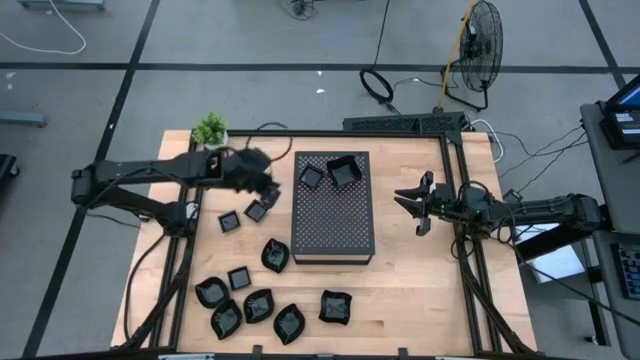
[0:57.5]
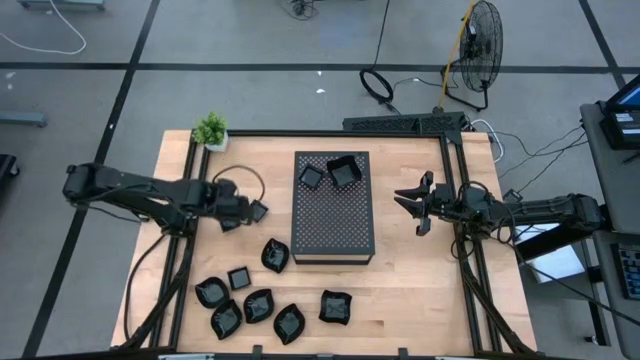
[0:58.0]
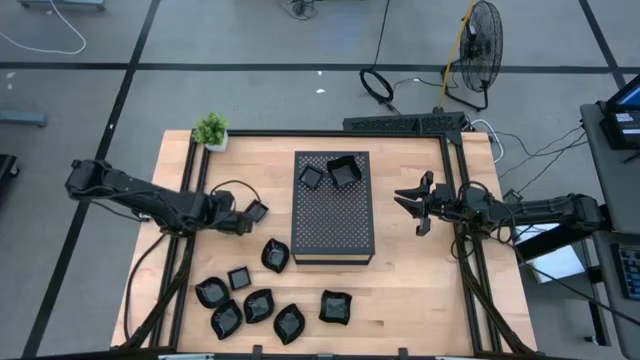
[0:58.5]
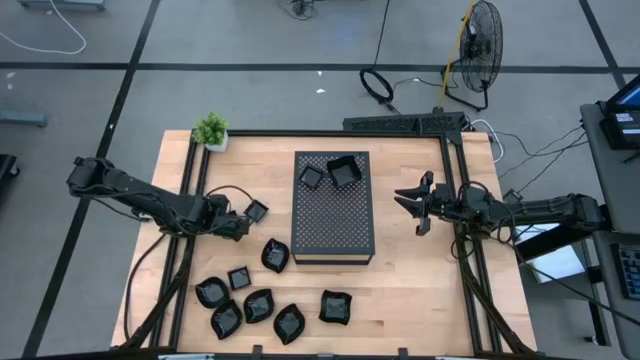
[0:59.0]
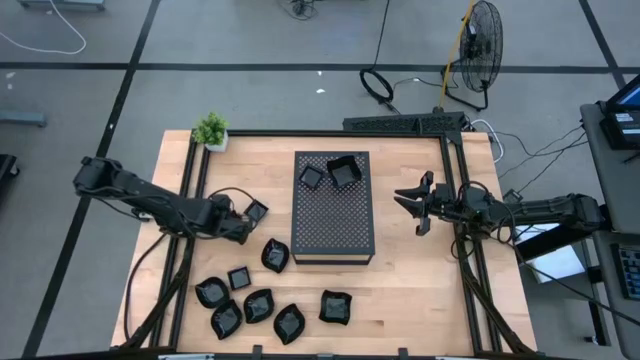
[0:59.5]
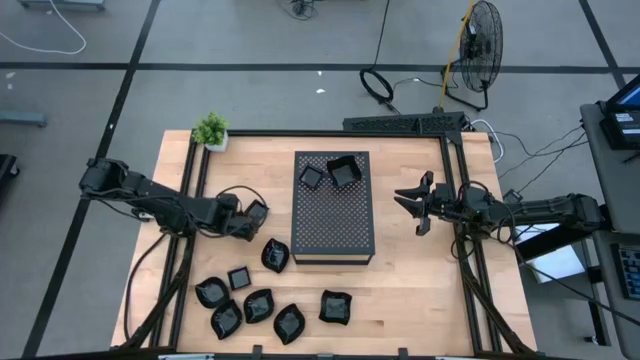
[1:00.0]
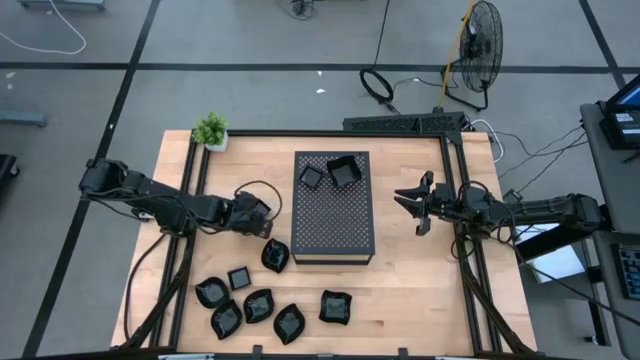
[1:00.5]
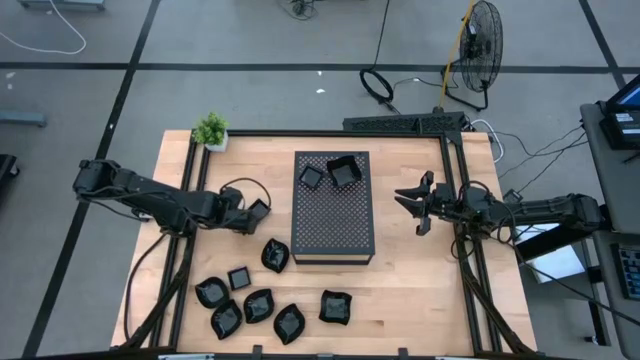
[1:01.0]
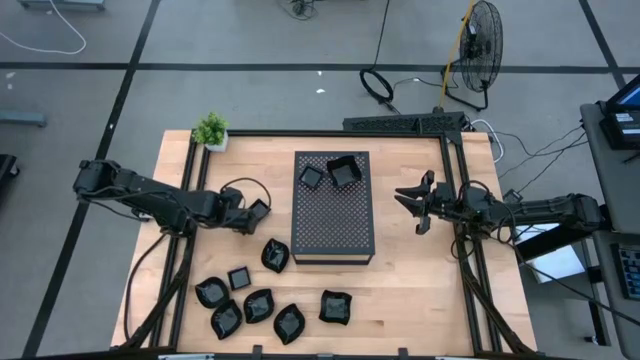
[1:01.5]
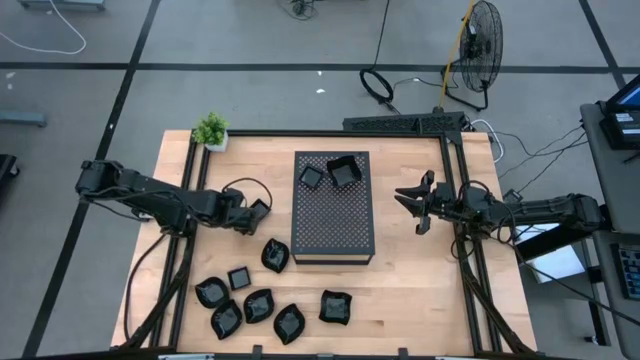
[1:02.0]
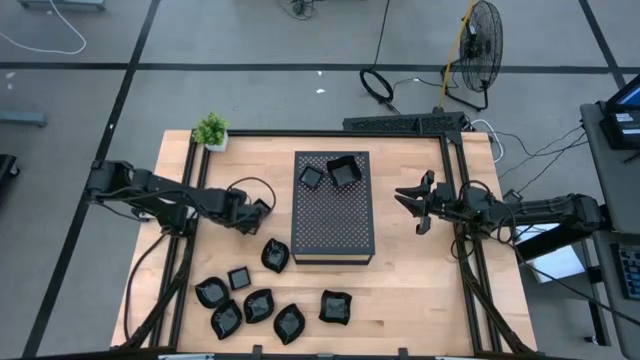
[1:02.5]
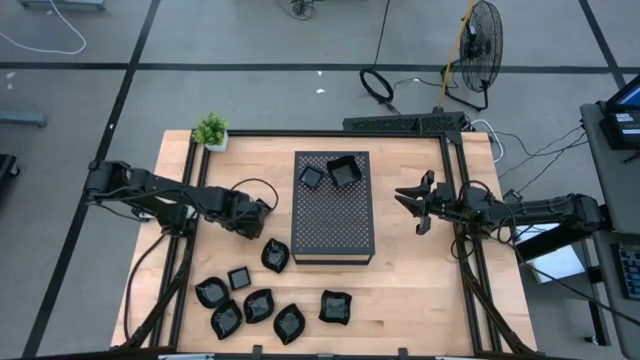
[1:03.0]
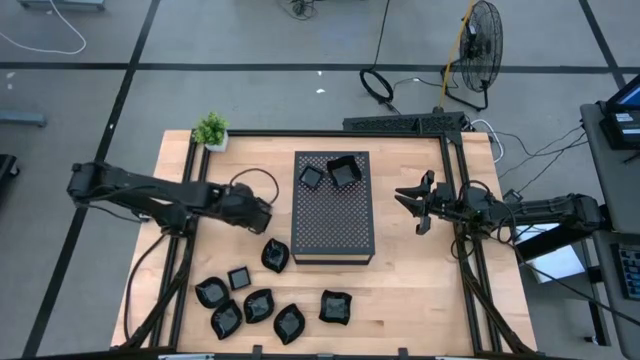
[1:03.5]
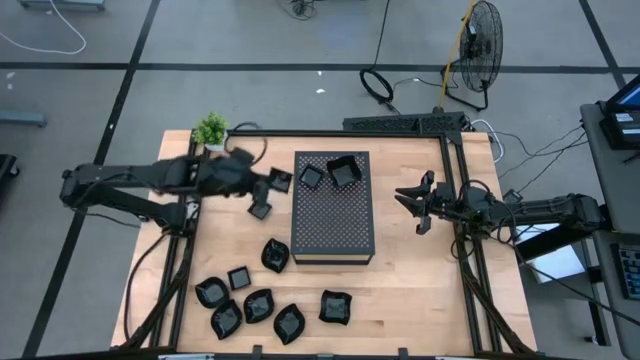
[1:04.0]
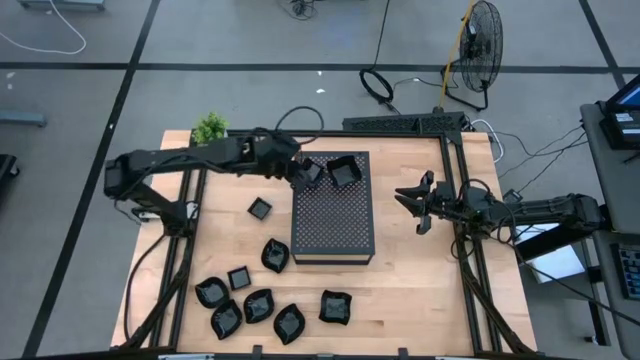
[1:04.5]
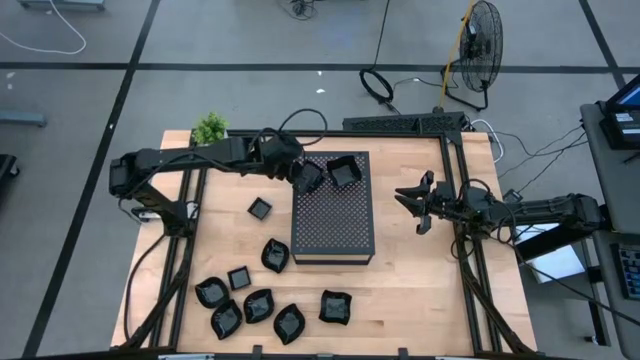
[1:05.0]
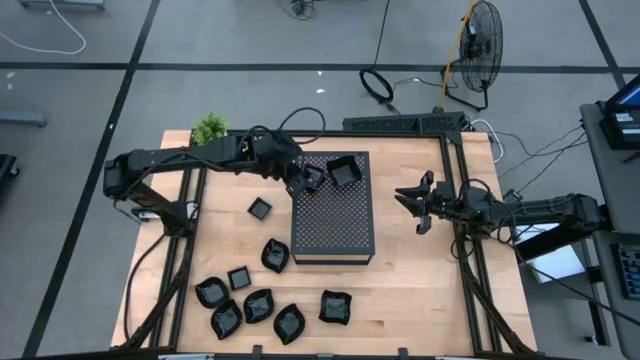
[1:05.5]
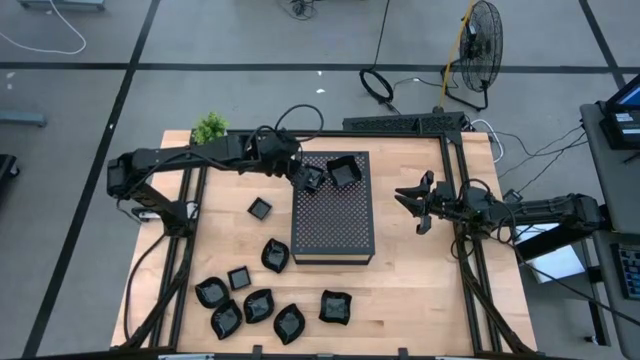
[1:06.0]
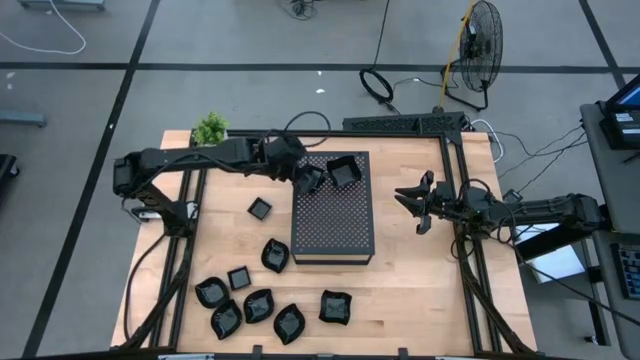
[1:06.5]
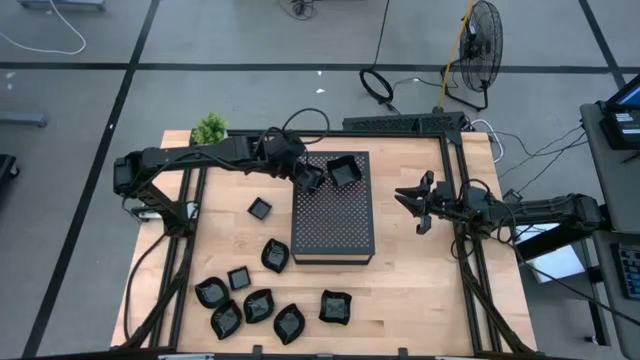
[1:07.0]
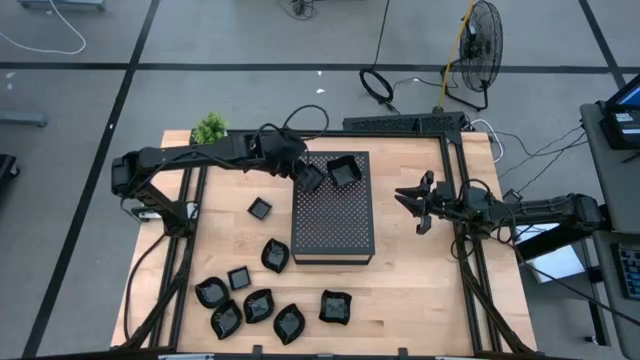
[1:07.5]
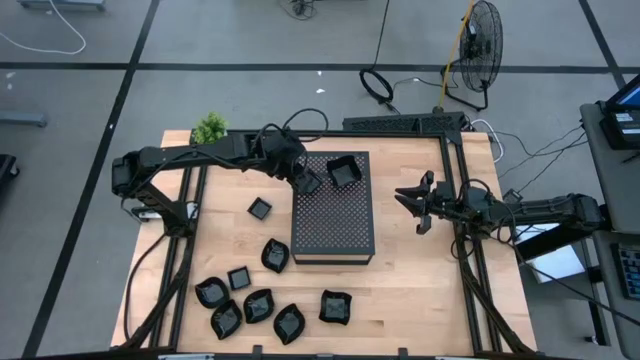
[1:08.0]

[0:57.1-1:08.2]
Task: Pick & Place Mini shaped plates
Stack the black square plate on top of the black square plates on the shelf

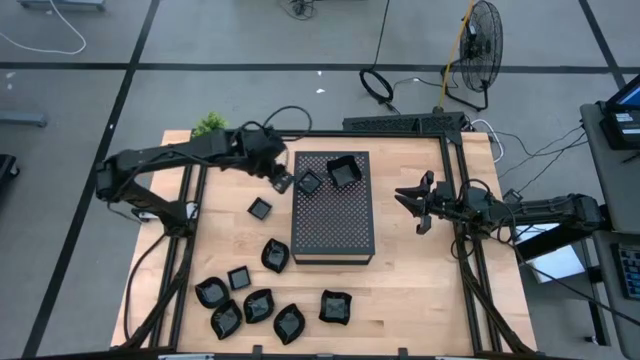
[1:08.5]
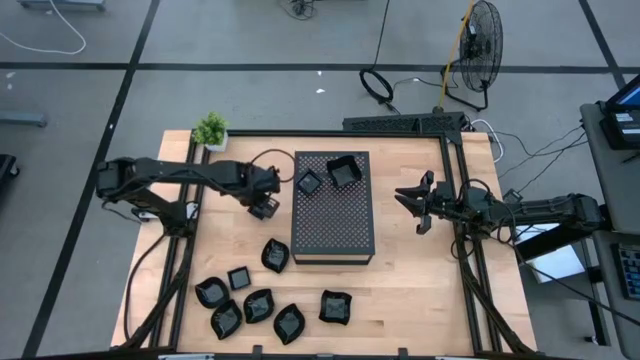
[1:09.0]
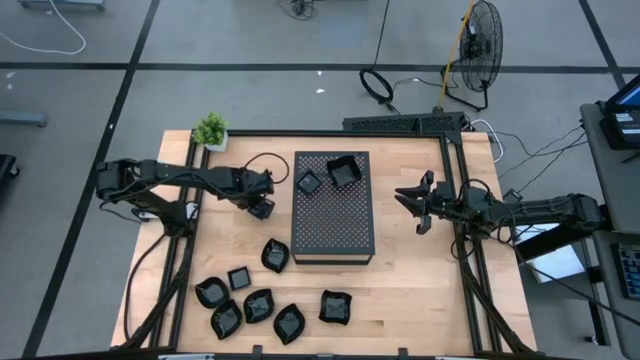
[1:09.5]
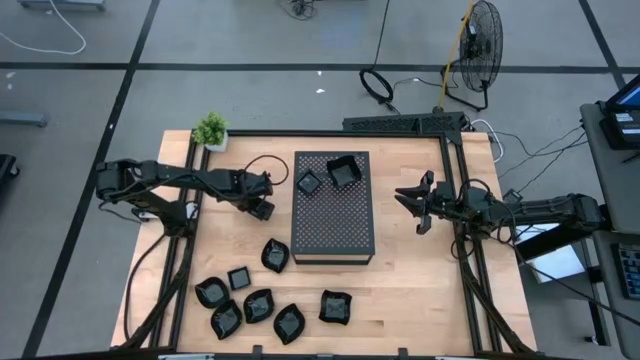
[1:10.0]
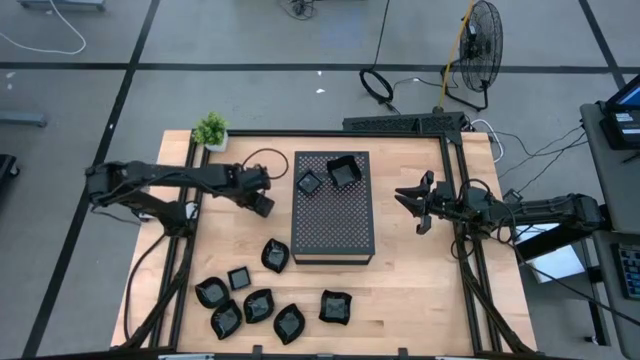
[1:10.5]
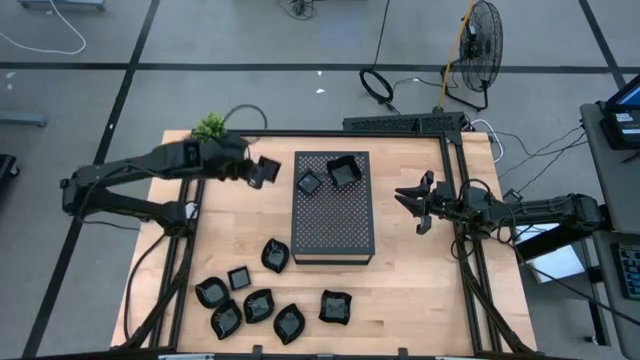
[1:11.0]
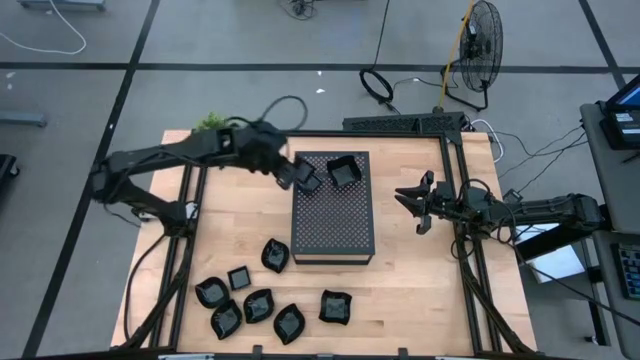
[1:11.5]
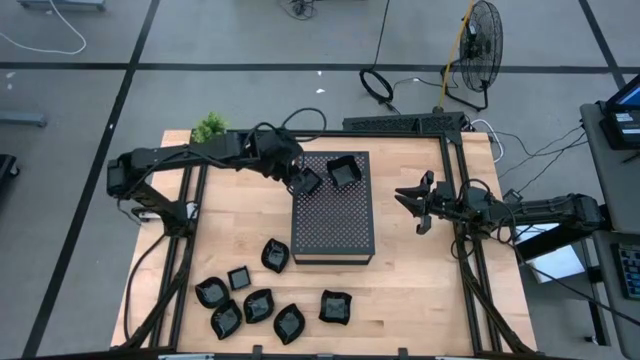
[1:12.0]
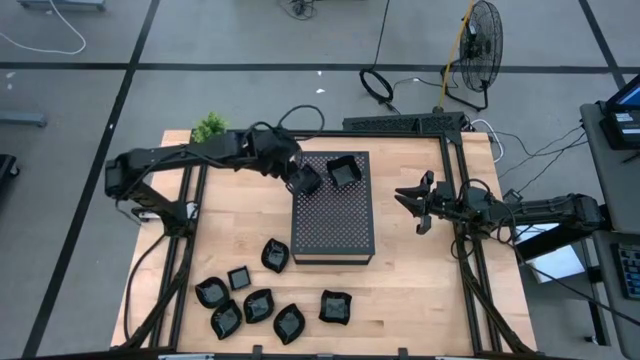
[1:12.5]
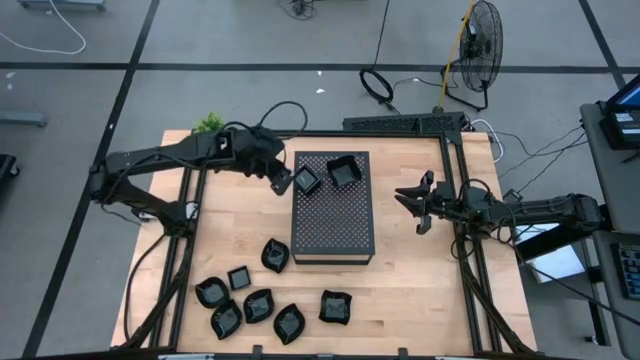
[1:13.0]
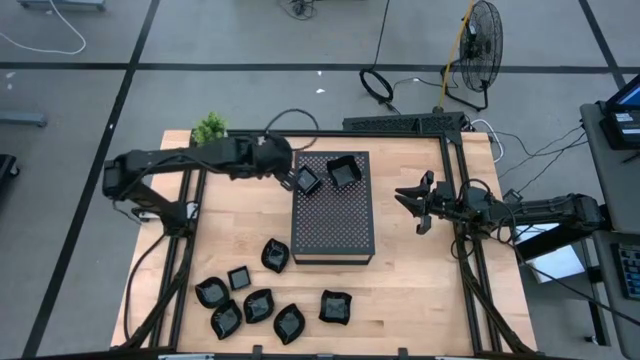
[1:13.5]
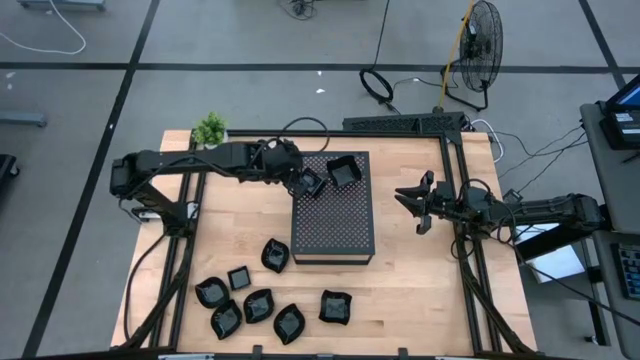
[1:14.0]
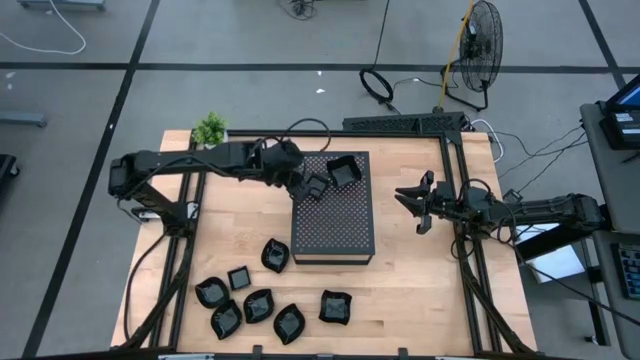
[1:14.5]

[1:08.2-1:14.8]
Stack the black square plate on top of the black square plates on the shelf

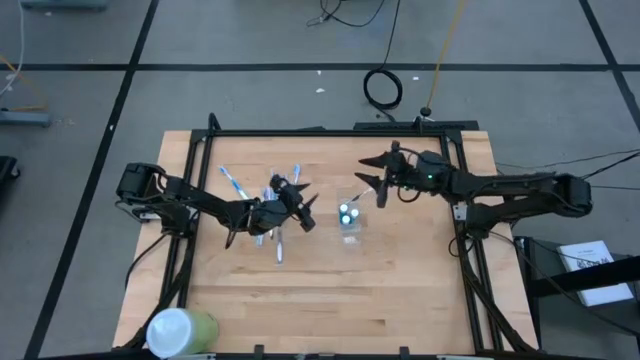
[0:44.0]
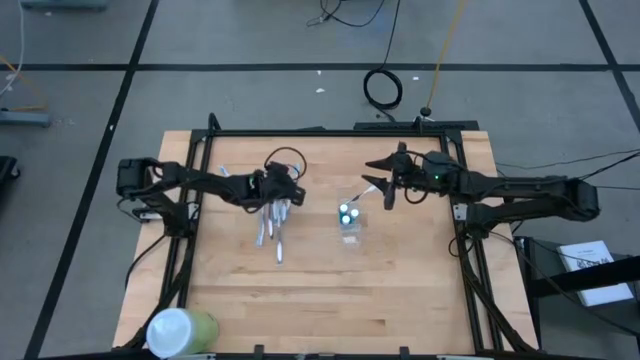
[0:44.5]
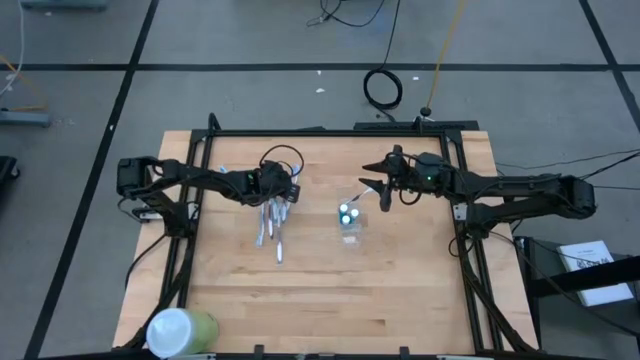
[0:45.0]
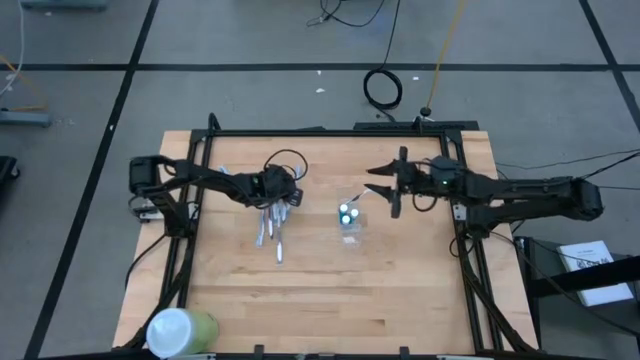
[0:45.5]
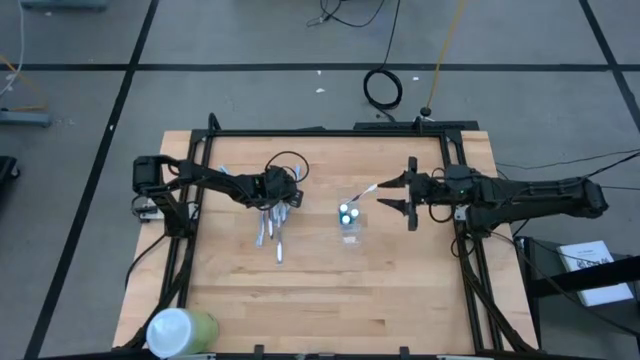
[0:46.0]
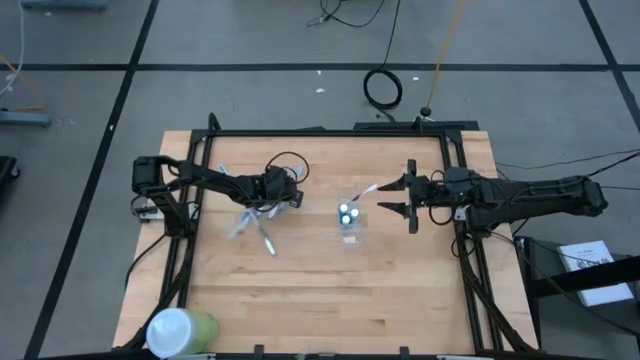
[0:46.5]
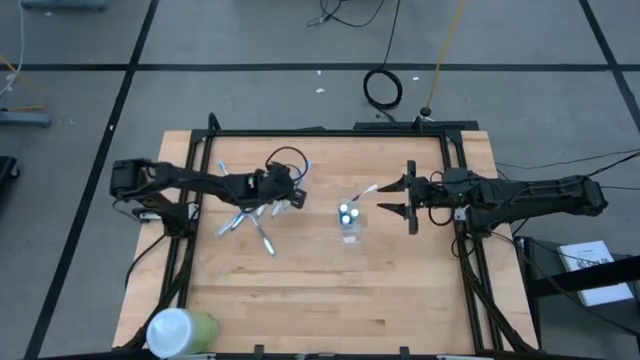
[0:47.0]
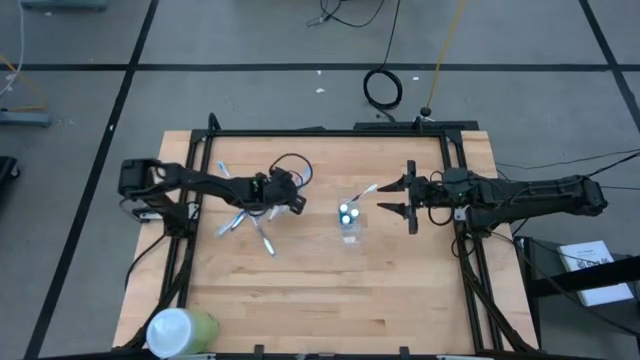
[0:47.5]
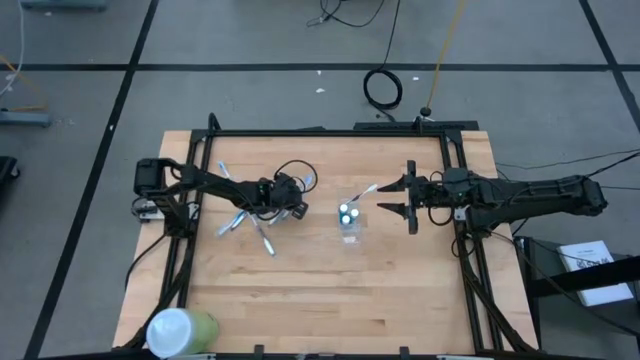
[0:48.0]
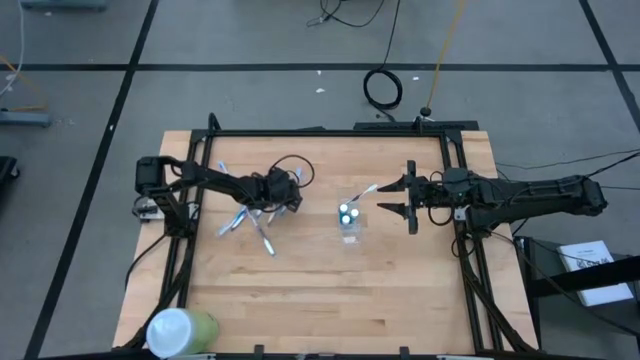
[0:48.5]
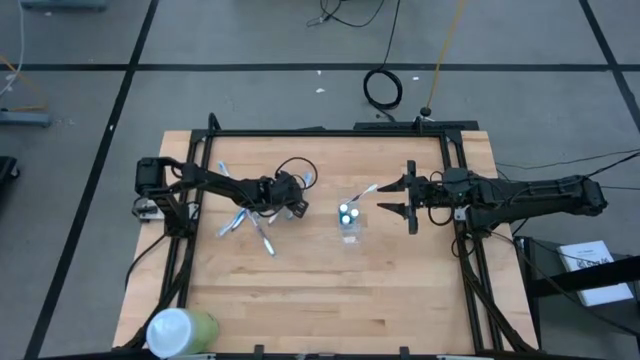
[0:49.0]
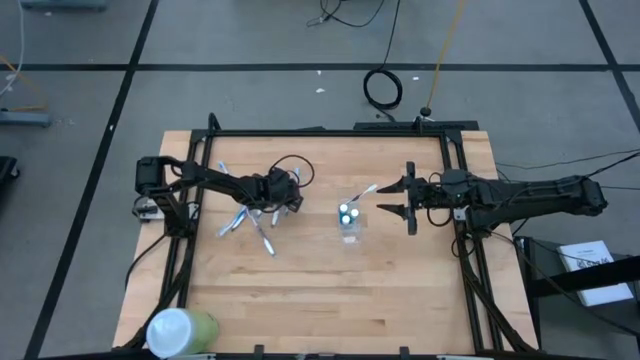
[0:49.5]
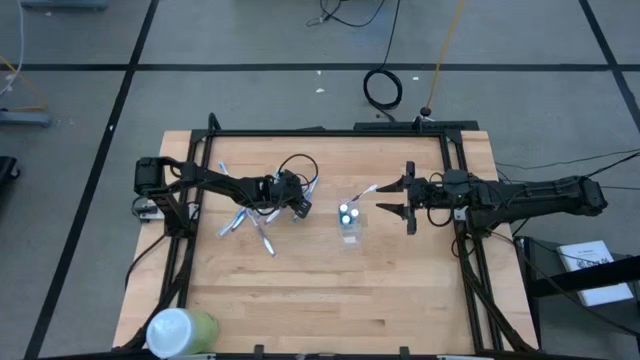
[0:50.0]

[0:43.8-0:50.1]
Task: Pick & Place toothbrushing station
Put the violet toothbrush into the transparent organizer
